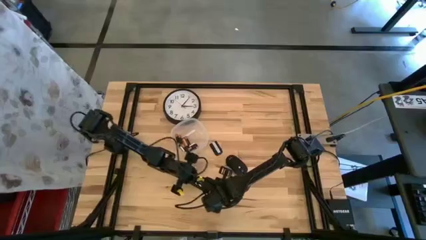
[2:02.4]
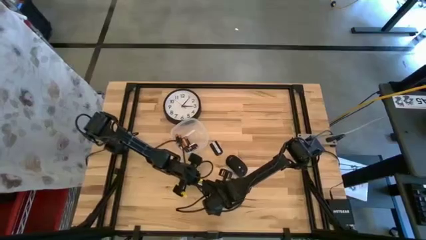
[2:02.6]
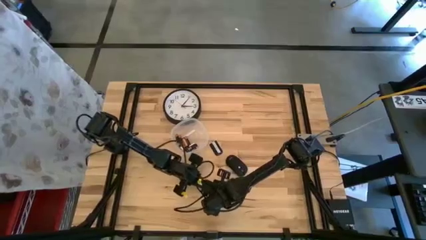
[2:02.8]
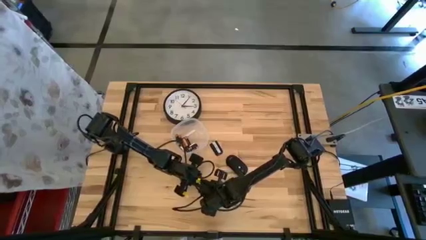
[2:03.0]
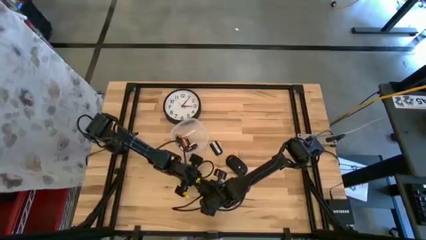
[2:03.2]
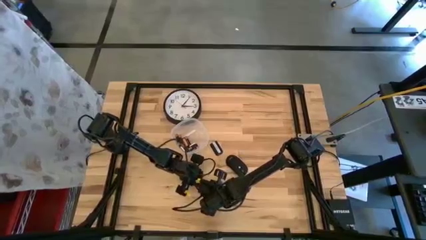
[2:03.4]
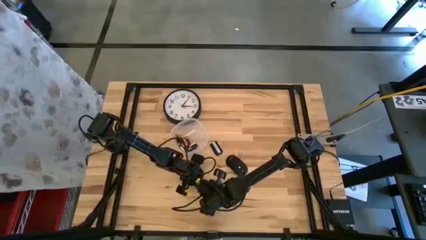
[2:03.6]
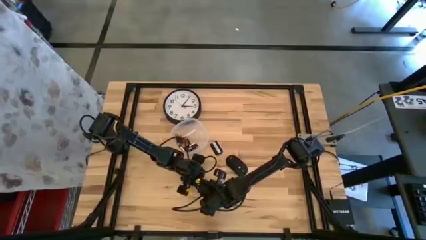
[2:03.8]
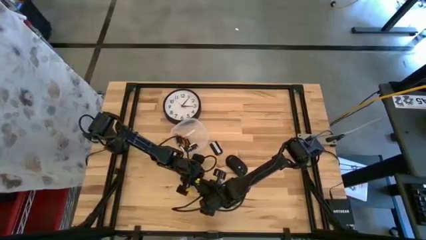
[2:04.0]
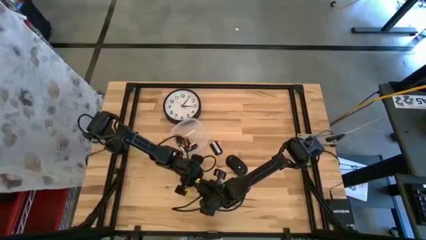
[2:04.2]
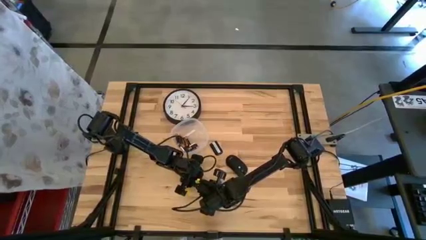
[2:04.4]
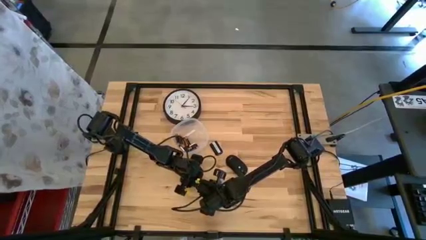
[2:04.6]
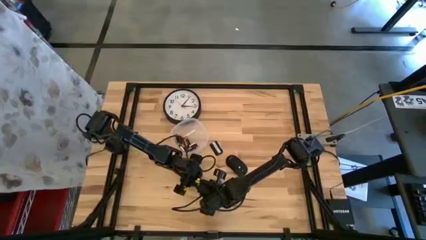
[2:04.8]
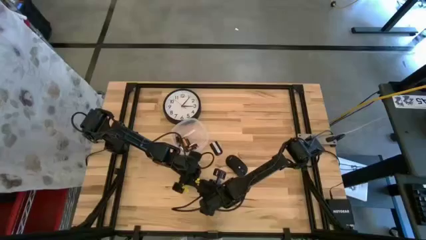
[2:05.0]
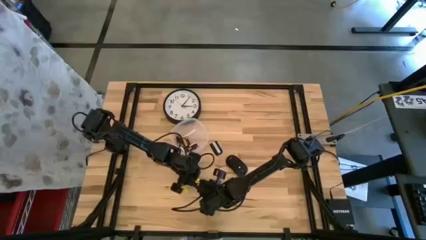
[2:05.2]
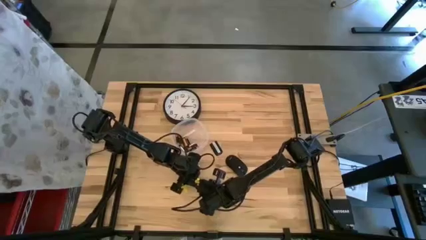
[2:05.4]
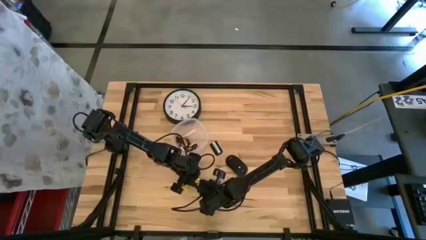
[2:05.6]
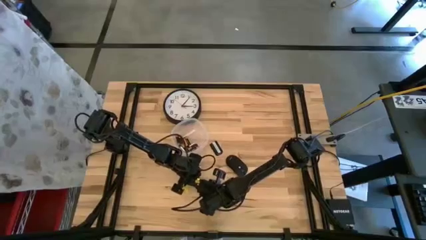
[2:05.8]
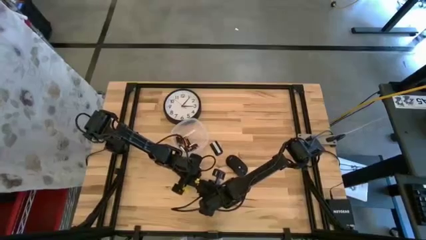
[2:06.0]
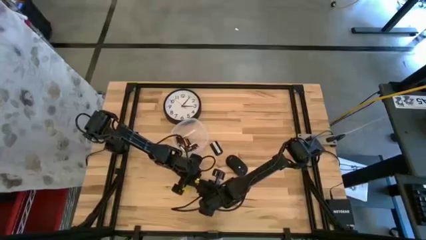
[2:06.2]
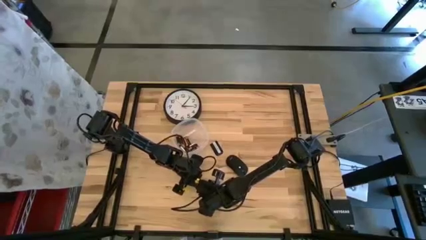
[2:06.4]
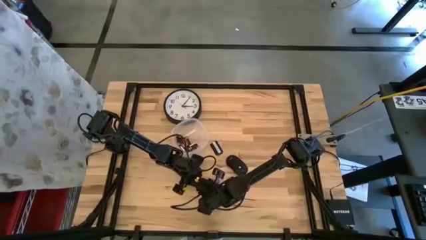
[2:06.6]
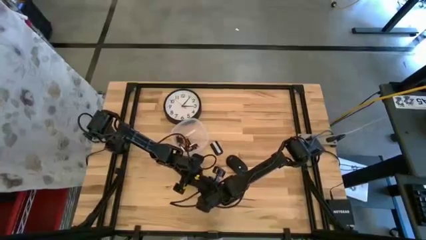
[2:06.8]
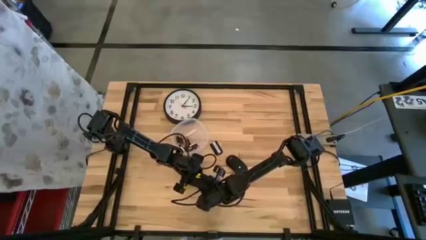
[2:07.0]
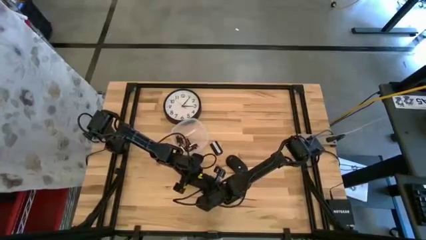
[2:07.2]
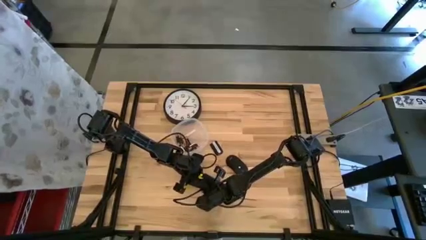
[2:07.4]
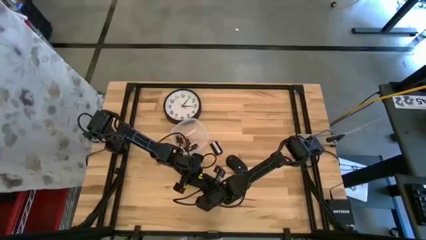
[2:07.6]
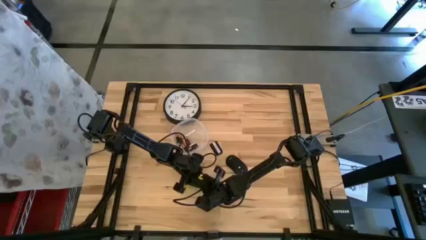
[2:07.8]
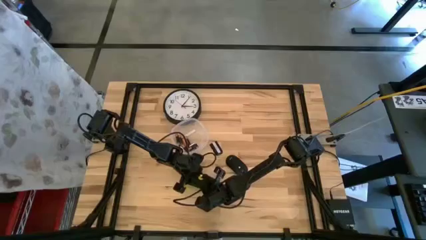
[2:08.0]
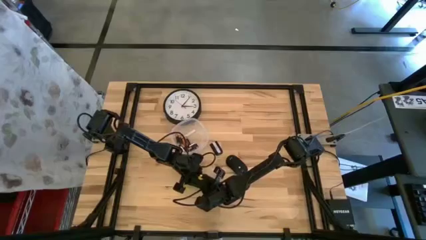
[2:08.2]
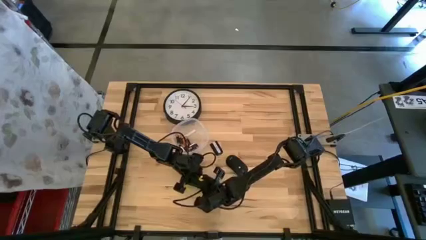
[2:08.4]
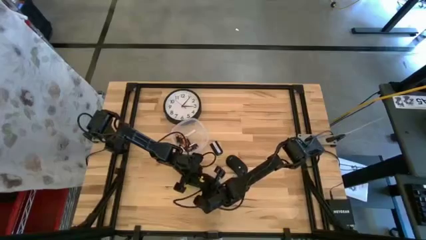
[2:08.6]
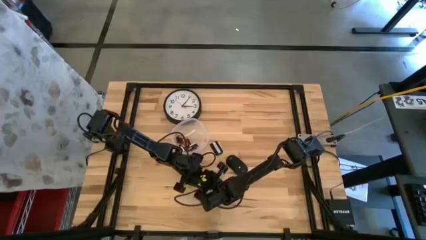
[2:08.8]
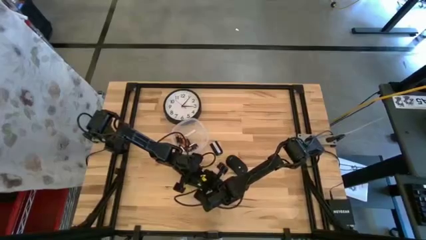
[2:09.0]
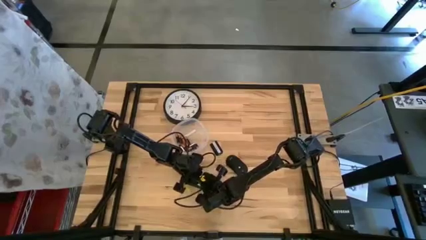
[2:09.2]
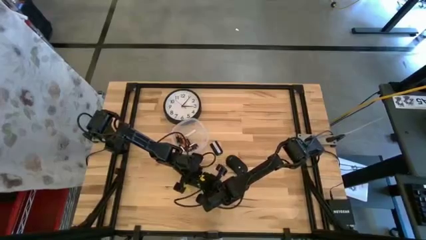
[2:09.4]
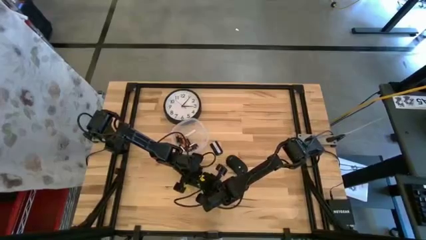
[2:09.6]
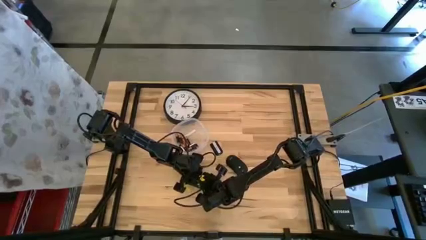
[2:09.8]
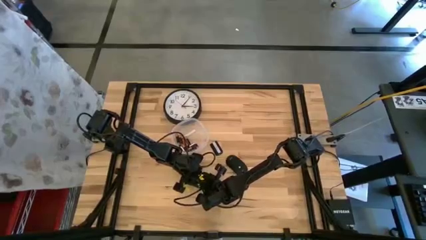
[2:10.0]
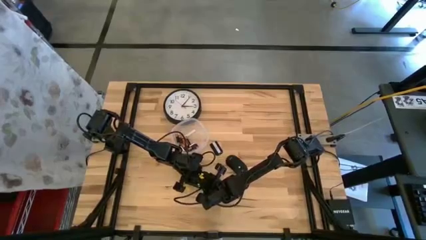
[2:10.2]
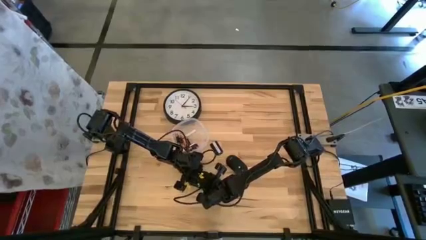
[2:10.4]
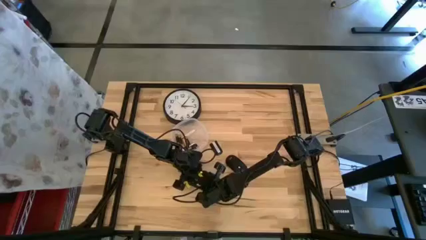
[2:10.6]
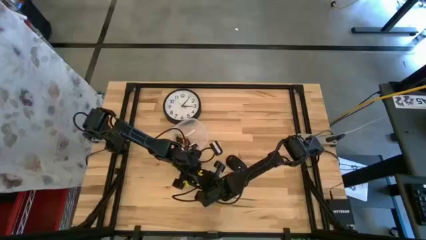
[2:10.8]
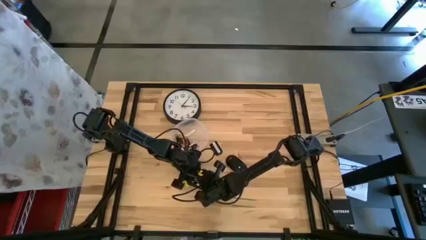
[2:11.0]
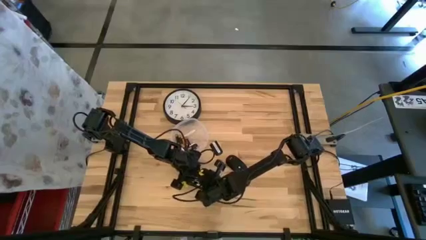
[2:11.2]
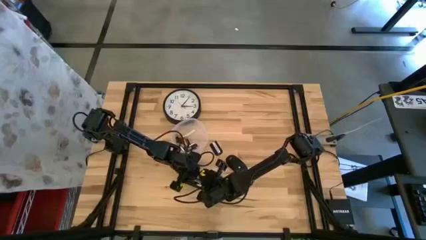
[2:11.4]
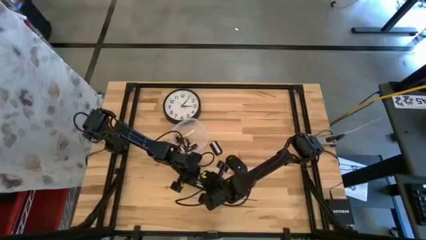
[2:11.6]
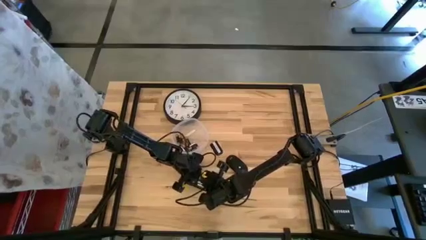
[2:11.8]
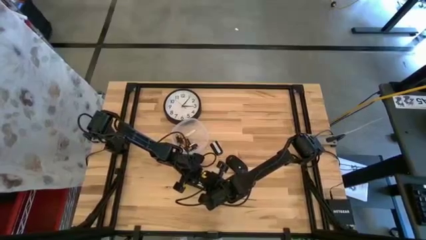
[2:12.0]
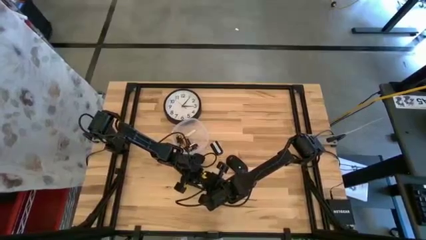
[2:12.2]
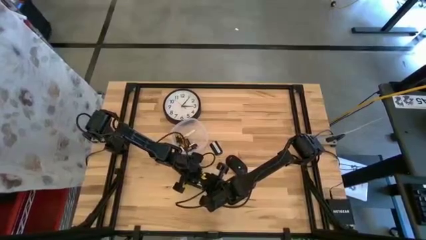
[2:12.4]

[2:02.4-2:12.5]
Task: Insert battery
Insert the silver battery into the remote control
